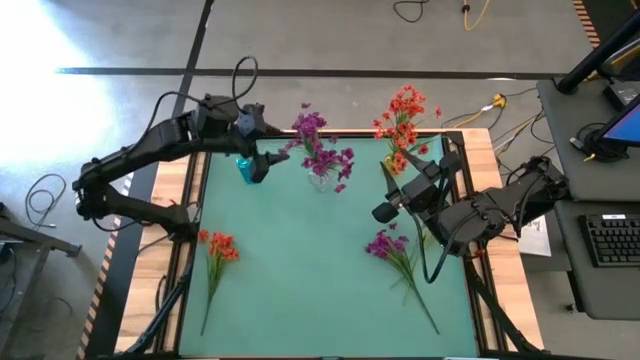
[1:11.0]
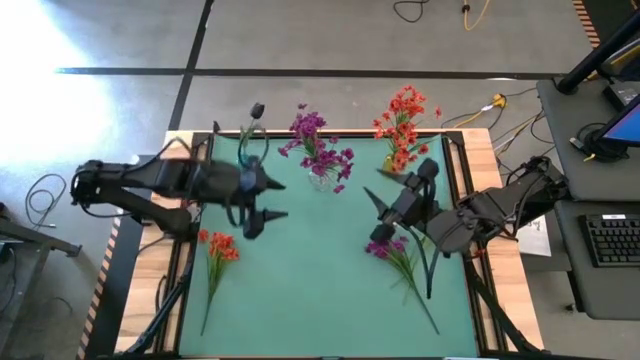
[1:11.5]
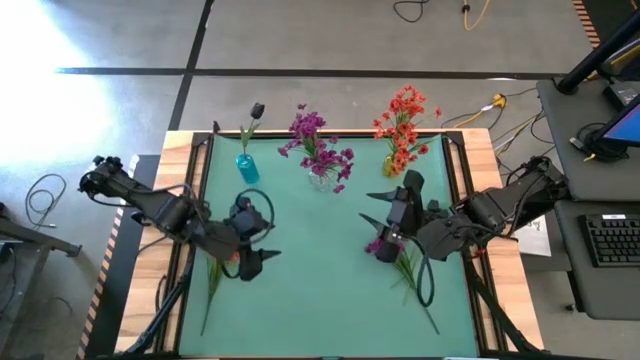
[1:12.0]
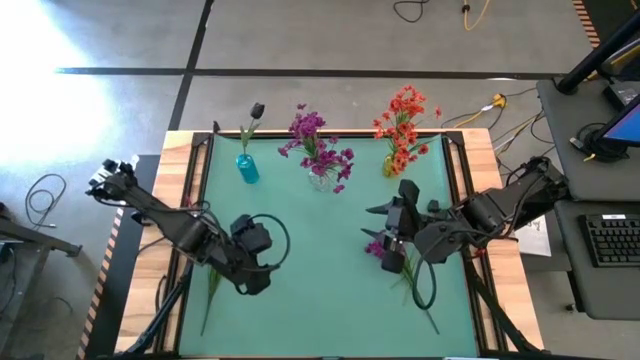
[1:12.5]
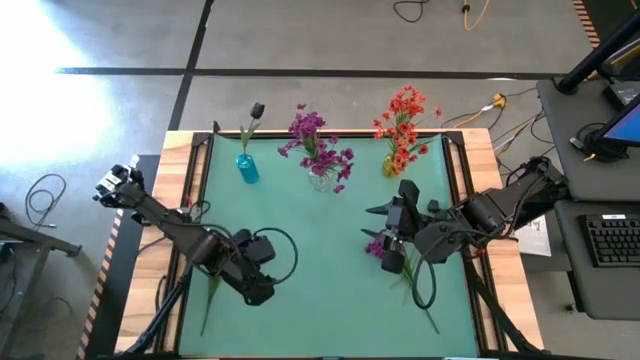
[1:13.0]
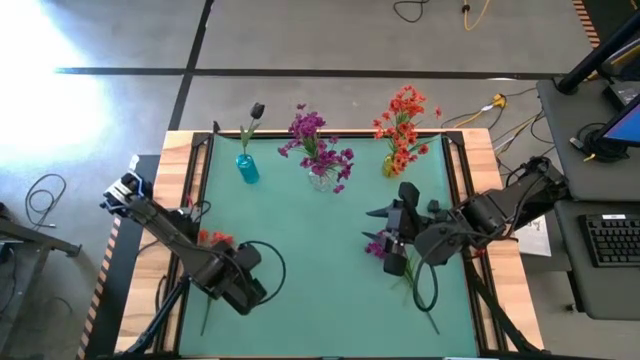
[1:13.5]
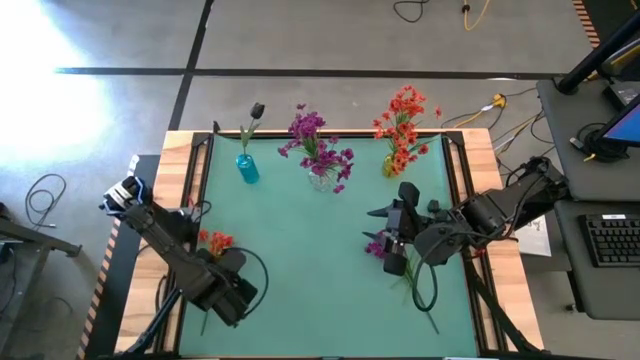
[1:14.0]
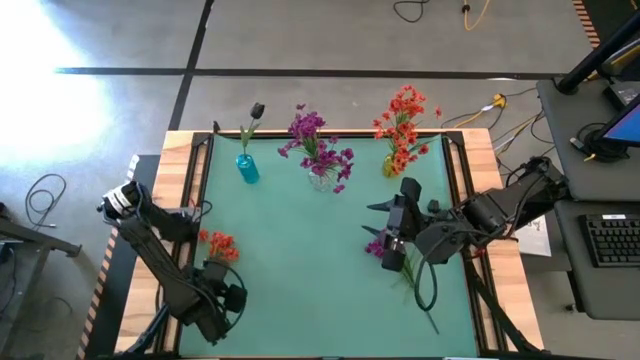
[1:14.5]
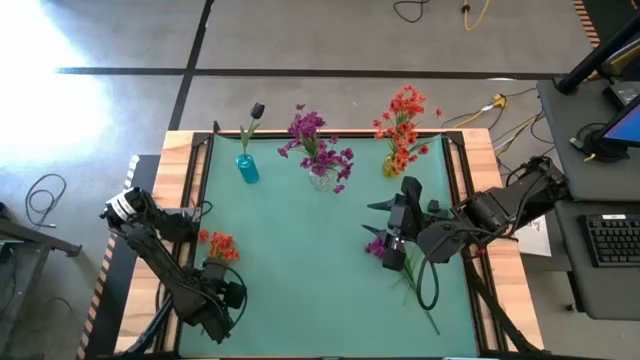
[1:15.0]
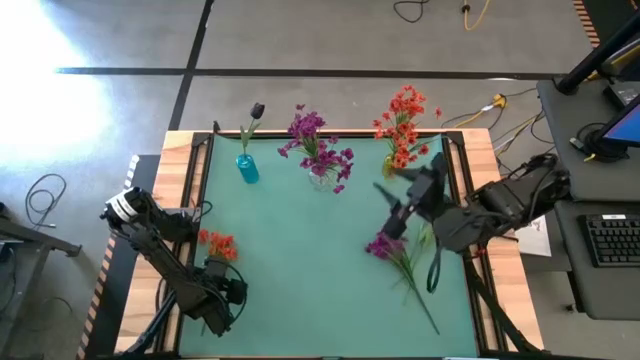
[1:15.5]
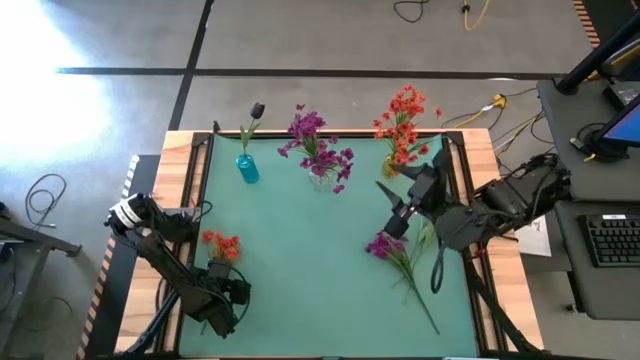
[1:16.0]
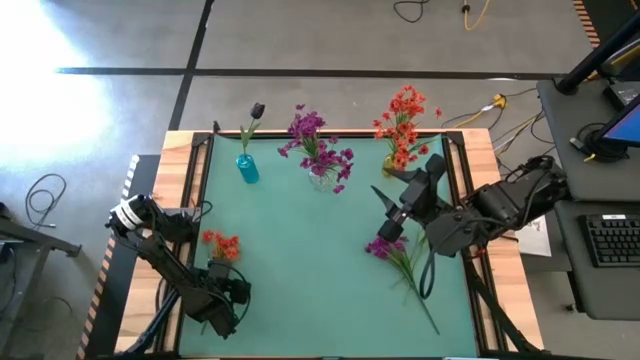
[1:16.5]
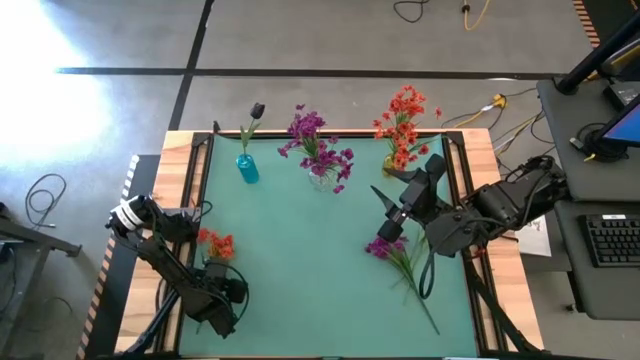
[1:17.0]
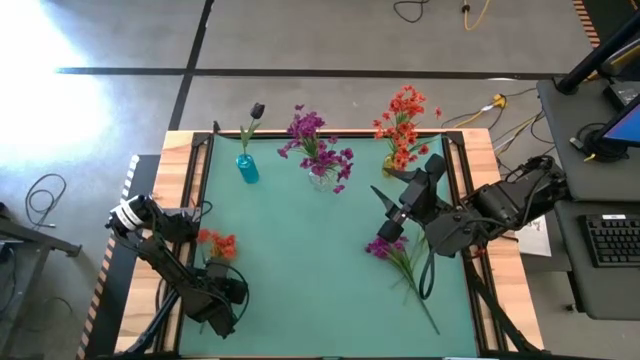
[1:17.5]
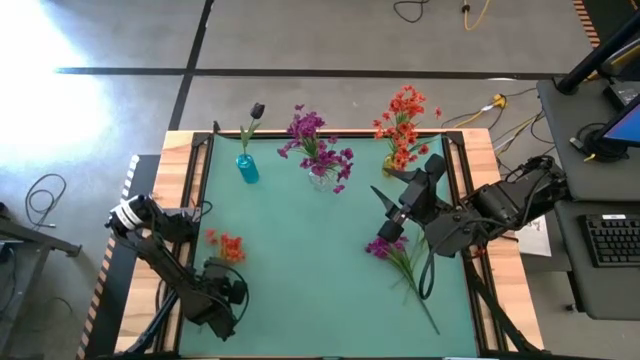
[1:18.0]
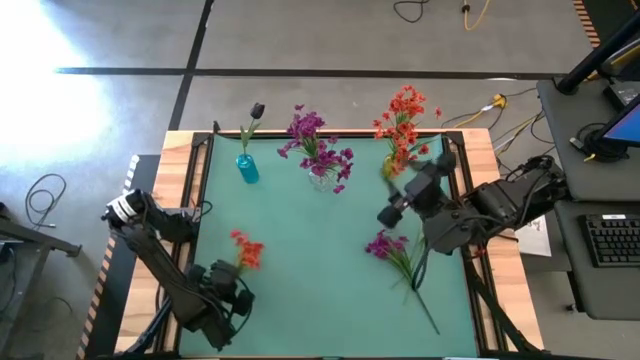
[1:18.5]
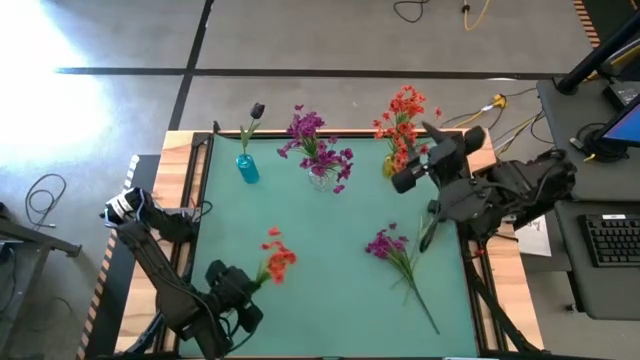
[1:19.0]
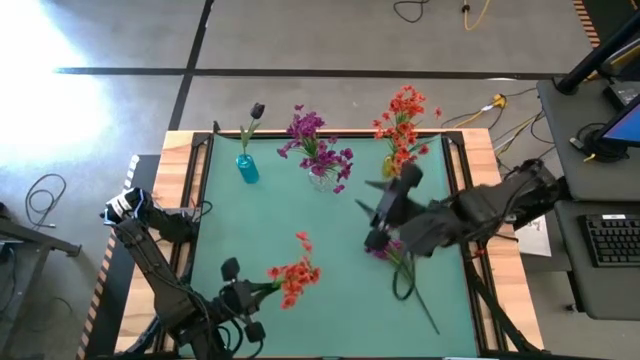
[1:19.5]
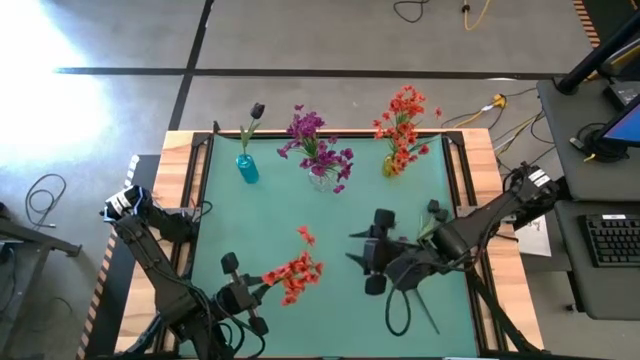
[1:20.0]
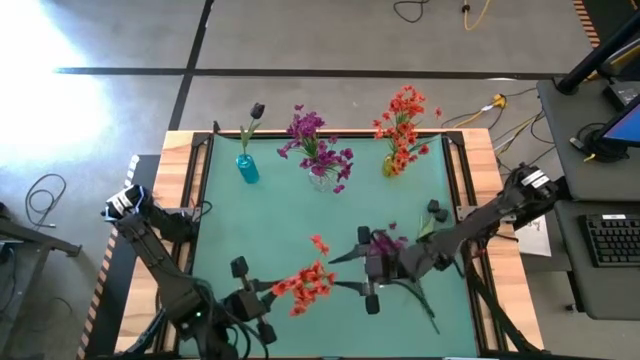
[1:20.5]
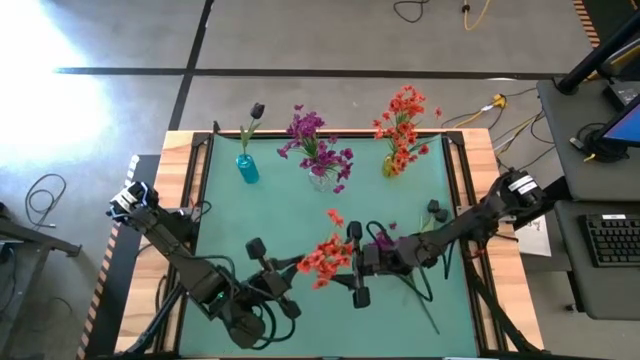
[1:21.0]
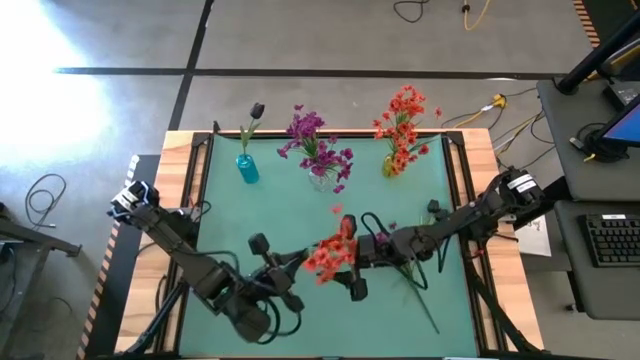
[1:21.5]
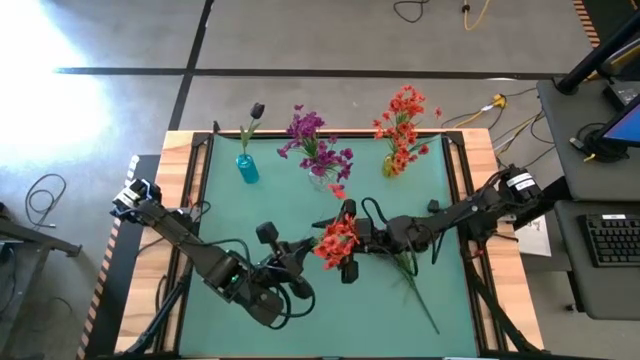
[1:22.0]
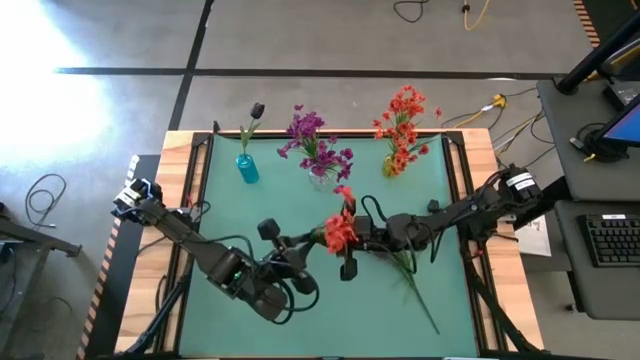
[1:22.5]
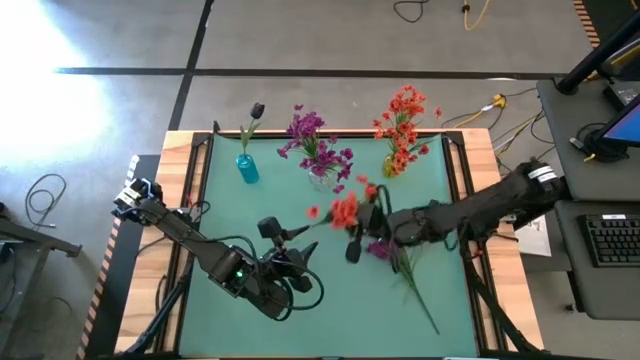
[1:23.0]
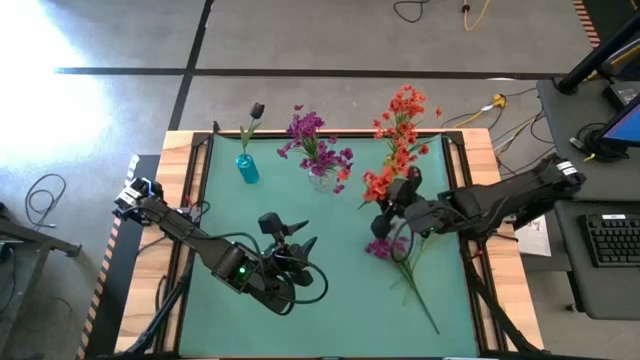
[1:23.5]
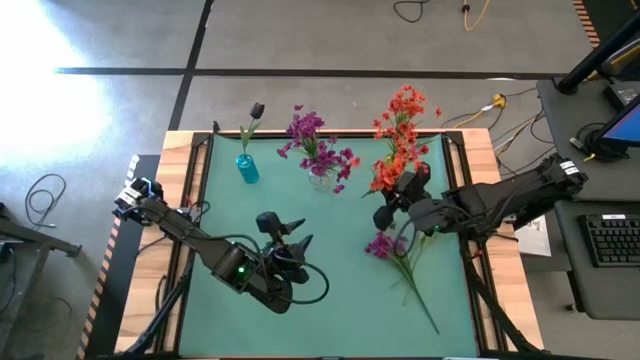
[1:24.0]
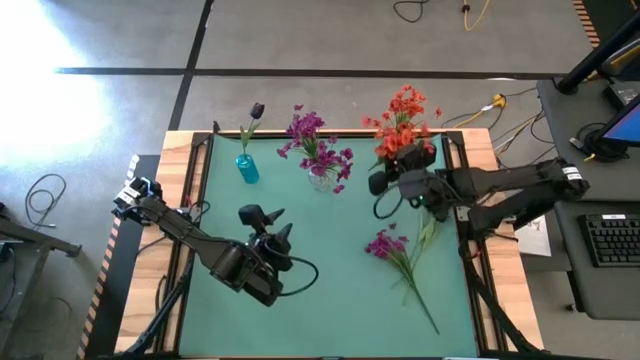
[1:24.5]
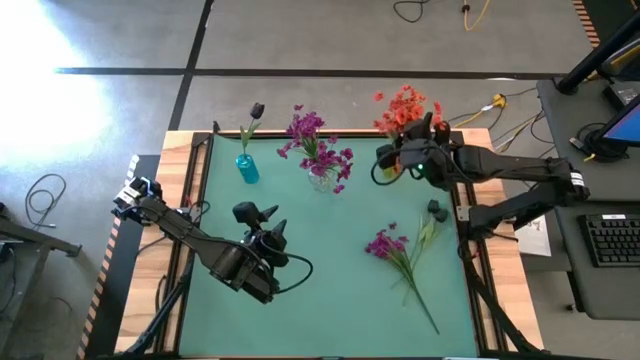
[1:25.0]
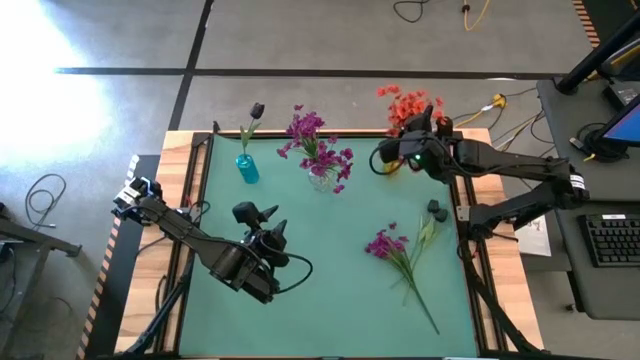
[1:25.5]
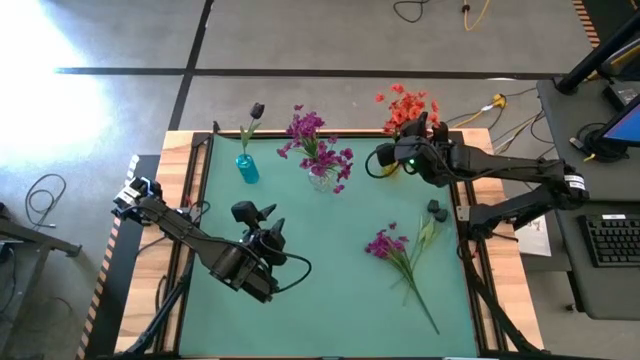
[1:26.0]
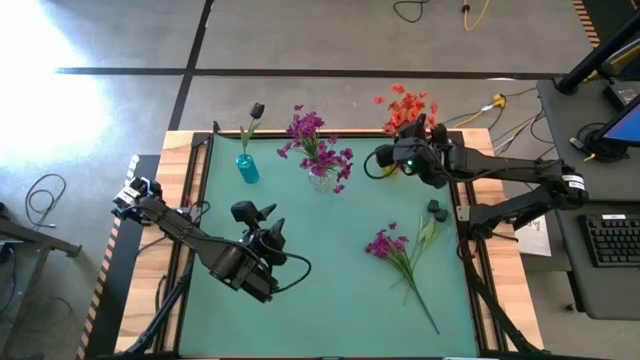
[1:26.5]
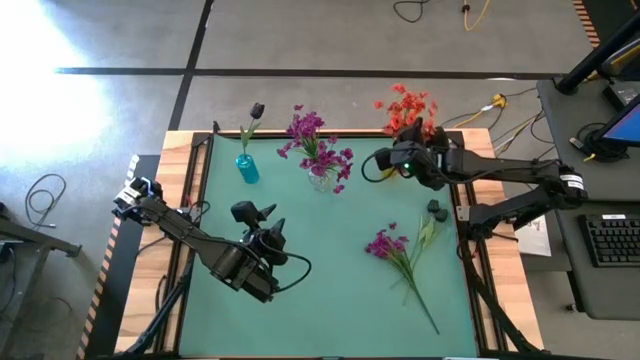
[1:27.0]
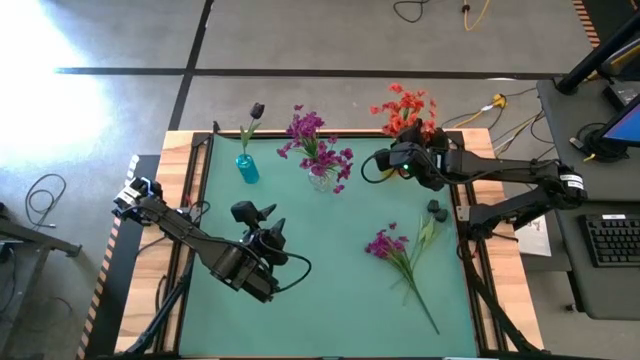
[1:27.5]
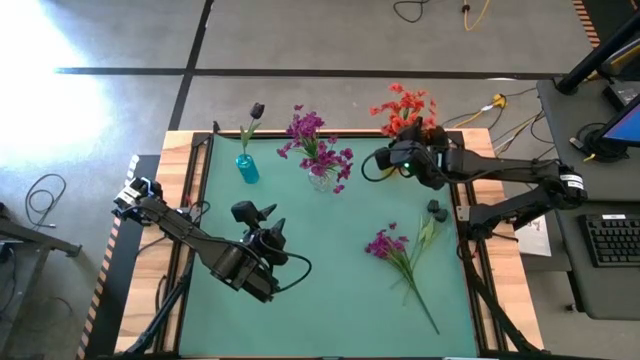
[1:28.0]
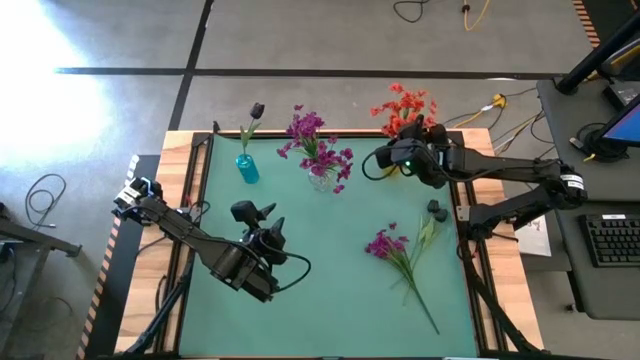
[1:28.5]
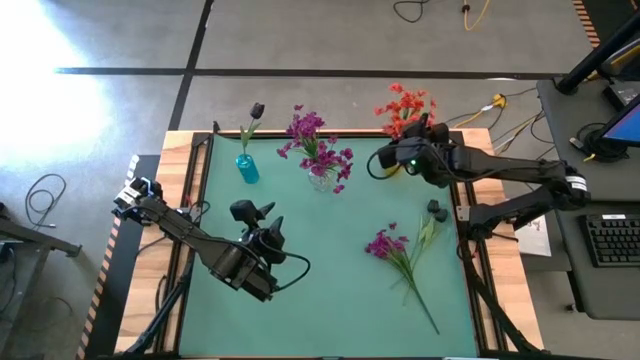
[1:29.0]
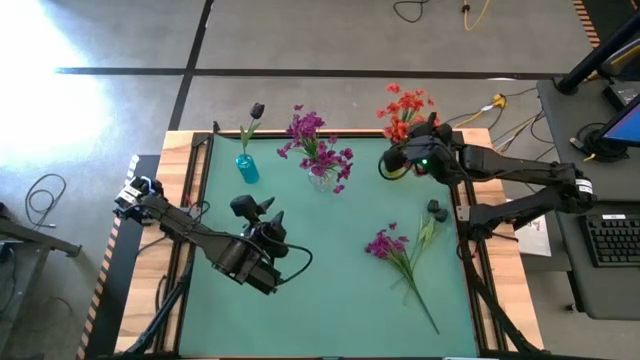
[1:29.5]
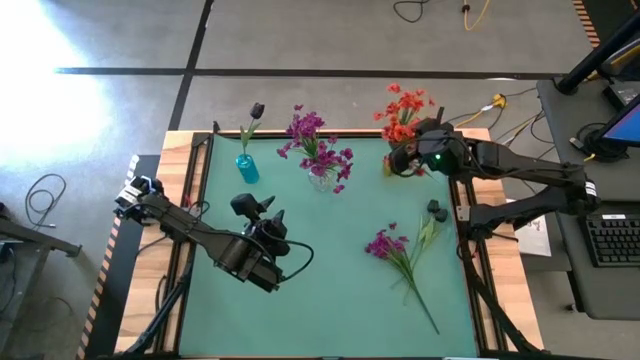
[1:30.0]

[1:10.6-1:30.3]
Task: Sort flowers into vase by color
Put the orange flowers into the blue flower vase

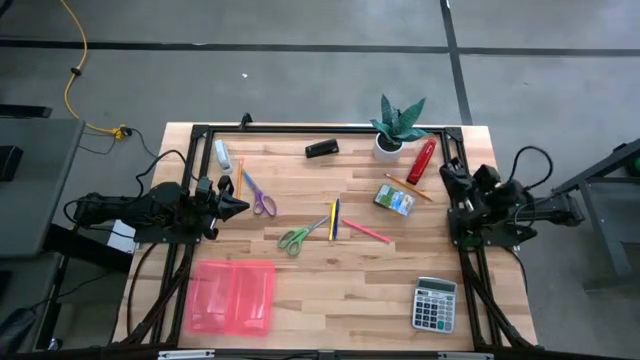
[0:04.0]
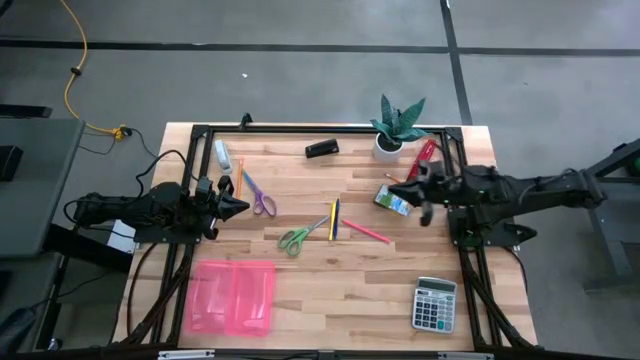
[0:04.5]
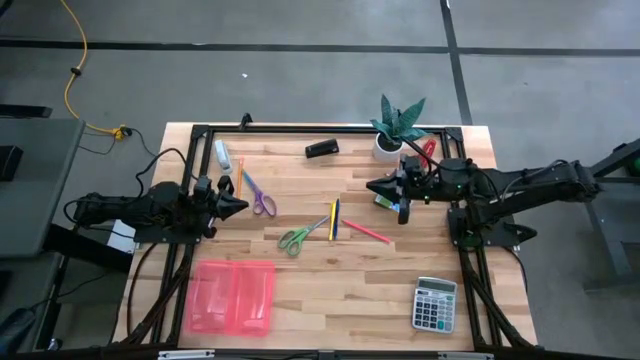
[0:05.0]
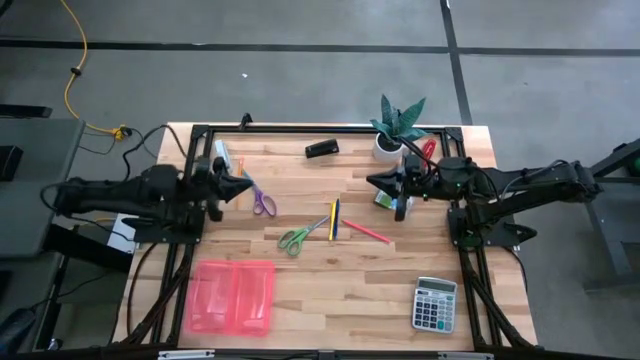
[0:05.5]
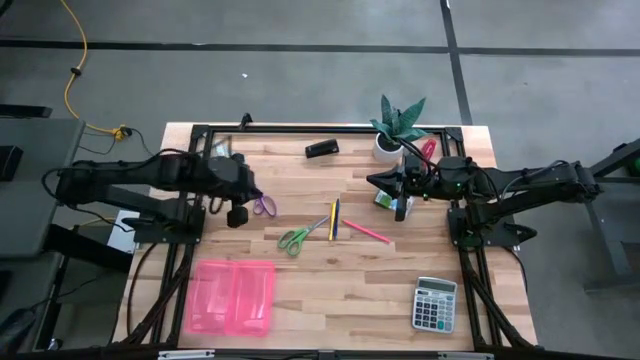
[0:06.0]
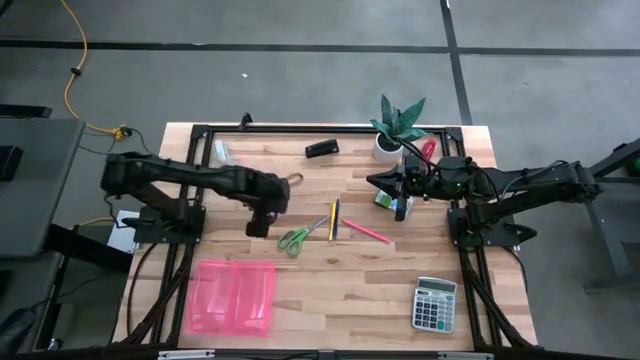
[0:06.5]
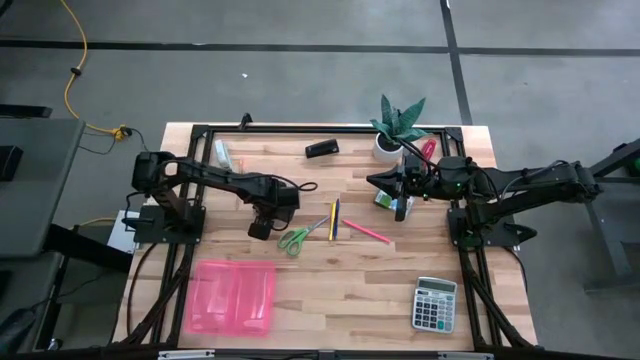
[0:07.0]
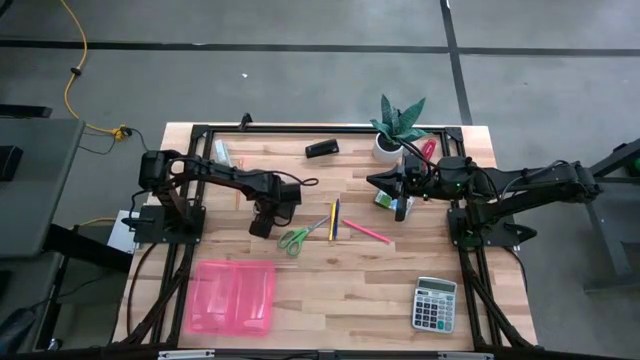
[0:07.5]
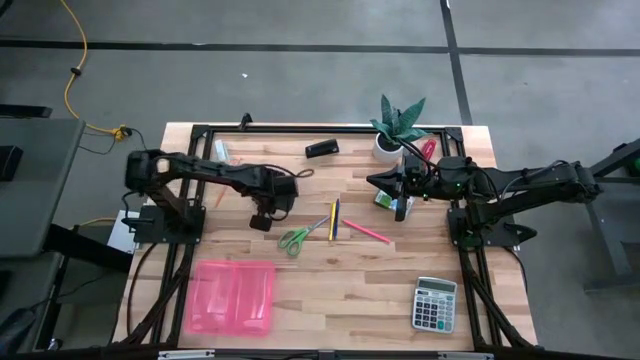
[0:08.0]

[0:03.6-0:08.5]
Task: Pack school essentials
Put the purple scissors into the supply box
